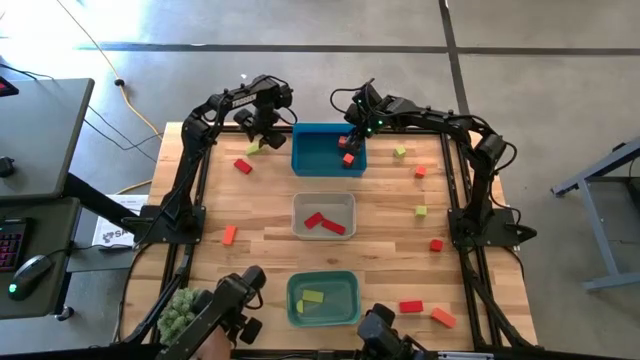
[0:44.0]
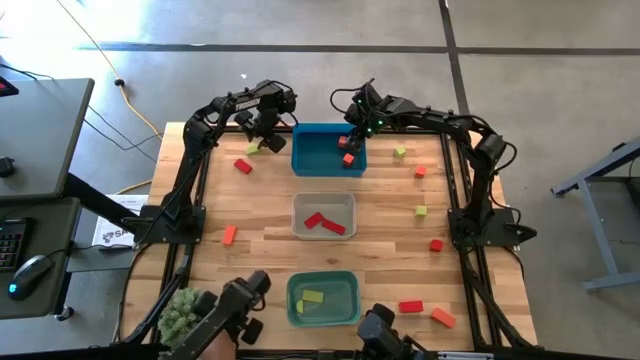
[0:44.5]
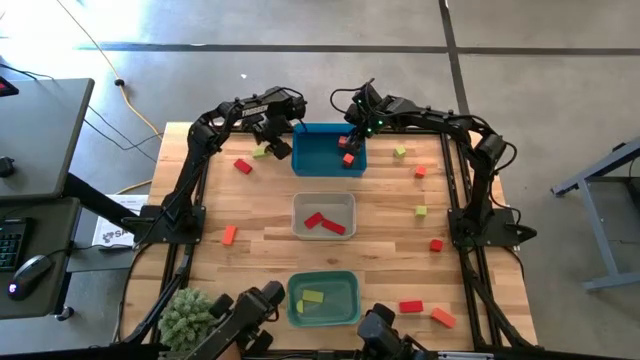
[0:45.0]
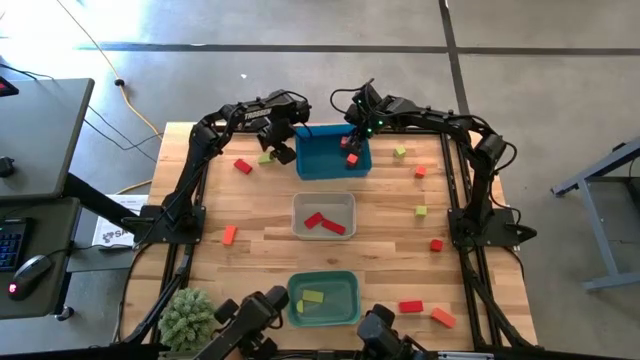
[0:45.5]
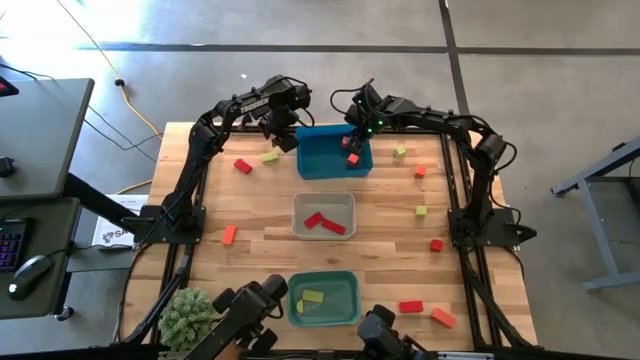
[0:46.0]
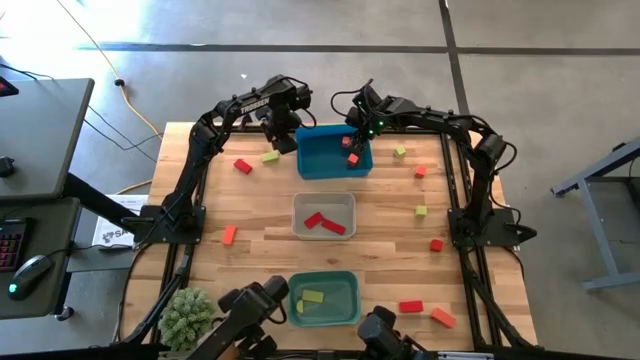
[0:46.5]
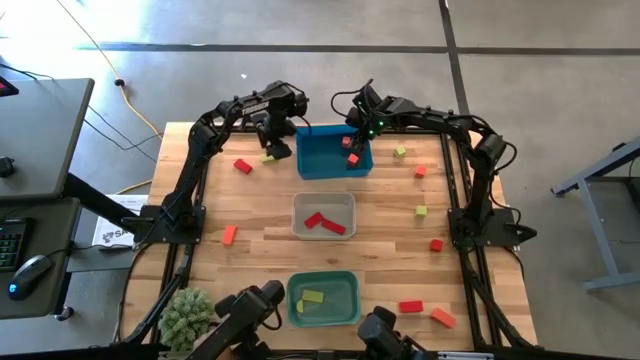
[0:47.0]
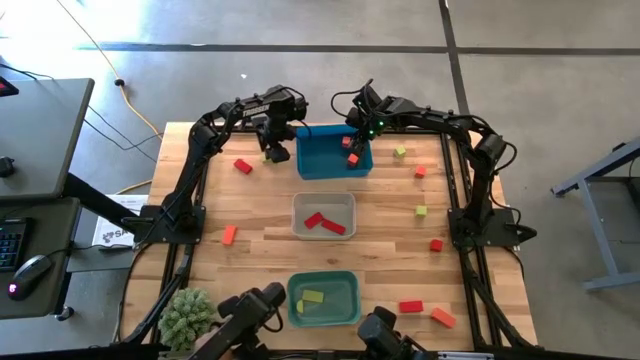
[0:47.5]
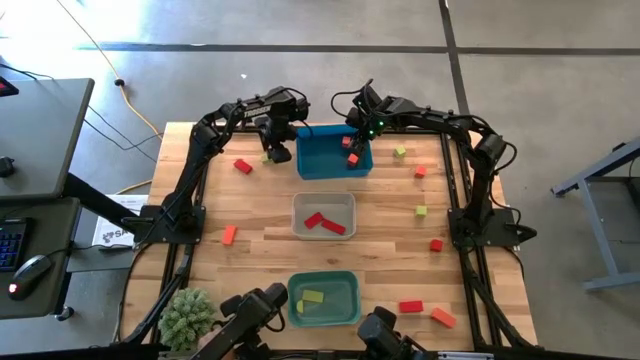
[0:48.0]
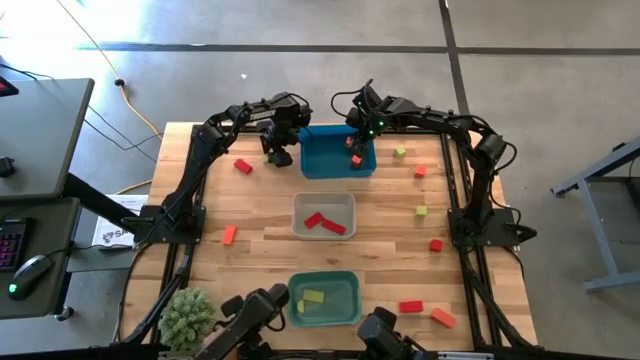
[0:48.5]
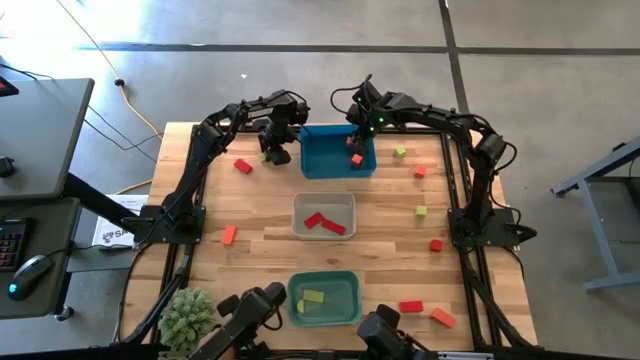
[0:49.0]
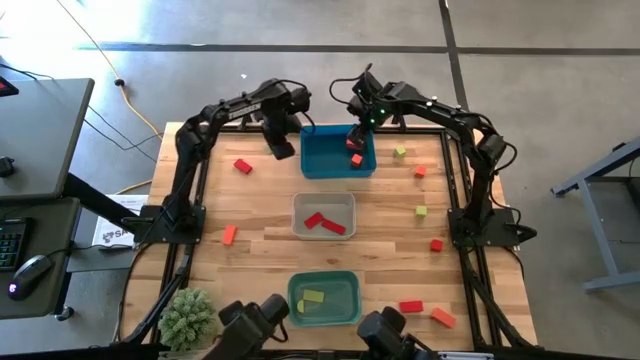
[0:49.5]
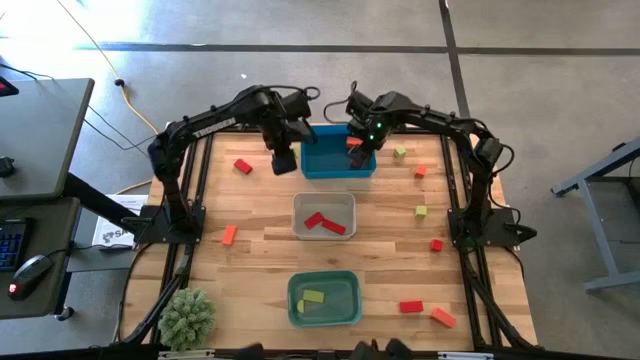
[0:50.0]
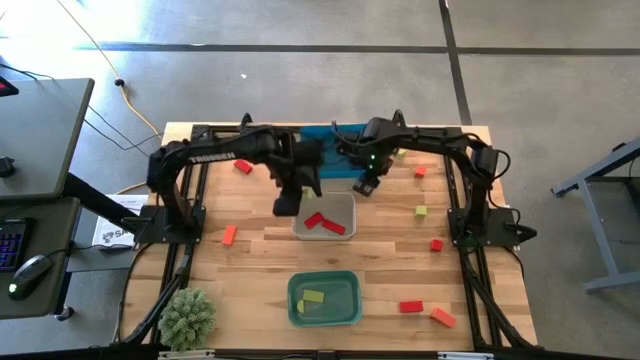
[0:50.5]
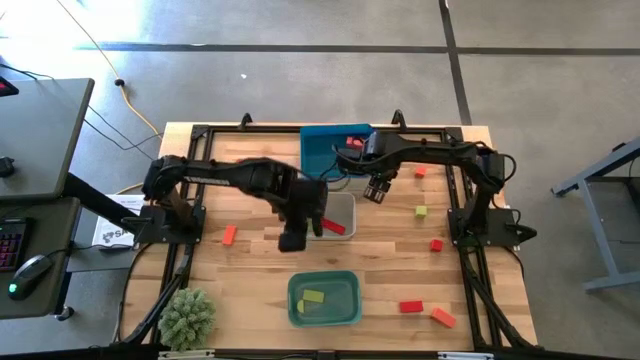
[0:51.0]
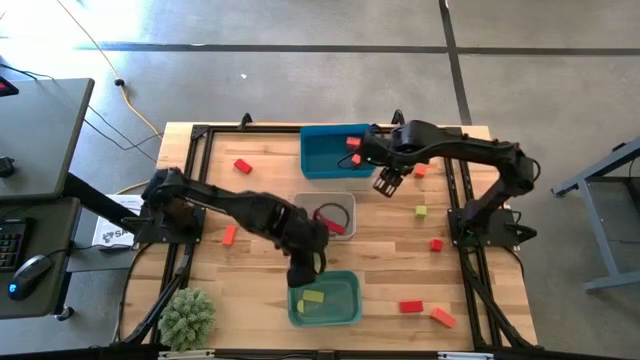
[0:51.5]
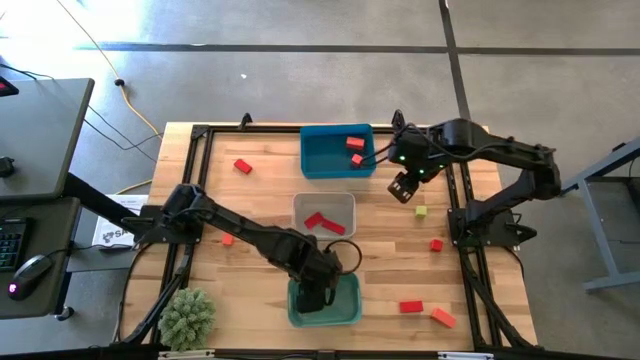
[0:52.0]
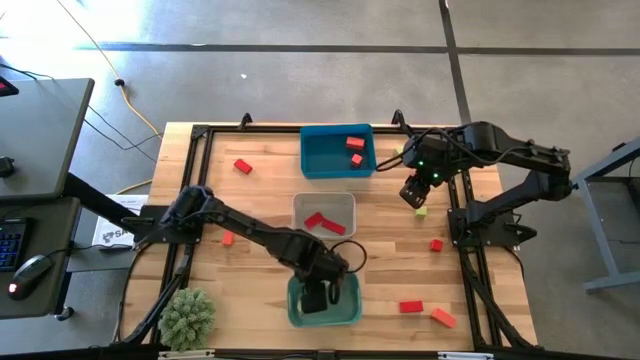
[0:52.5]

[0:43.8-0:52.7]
Task: Sort & place blocks by color
Put the light green block into the green bin

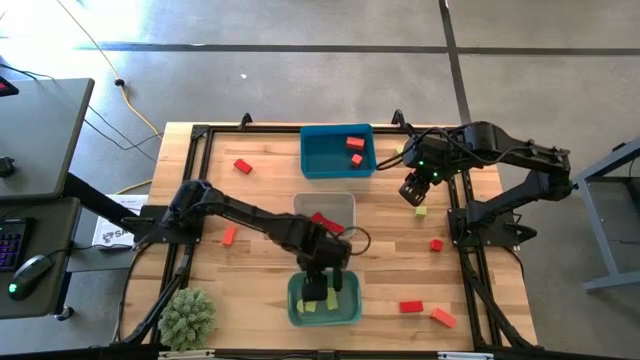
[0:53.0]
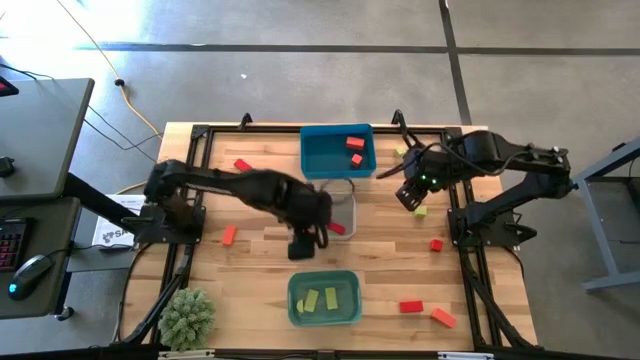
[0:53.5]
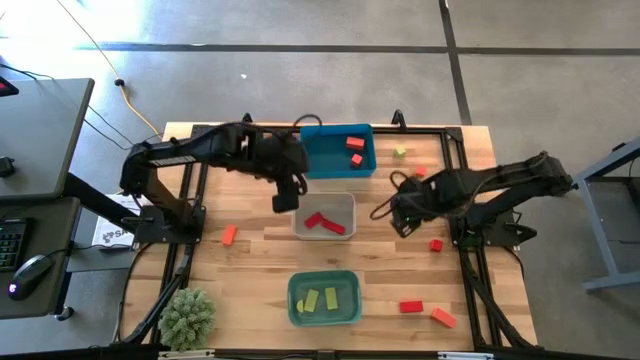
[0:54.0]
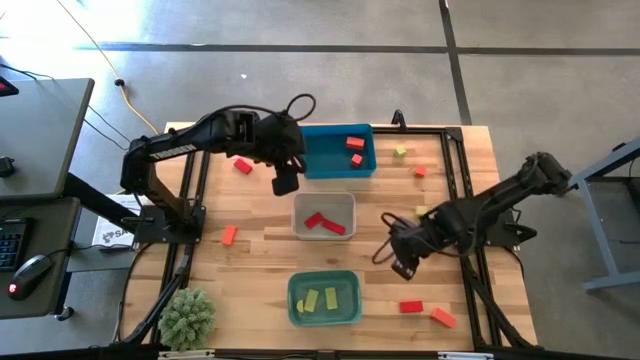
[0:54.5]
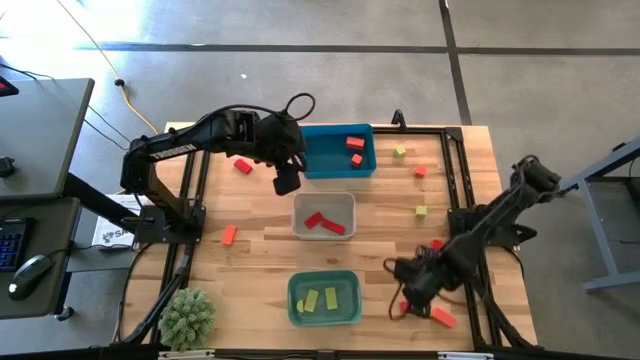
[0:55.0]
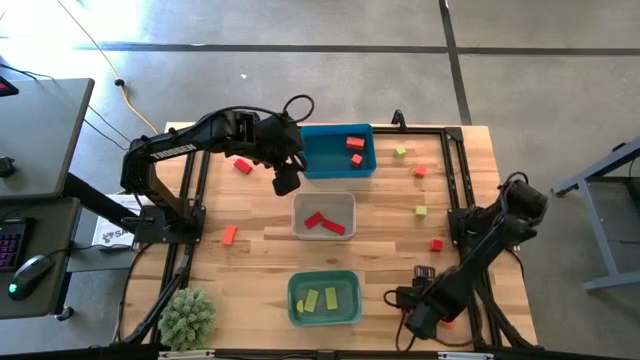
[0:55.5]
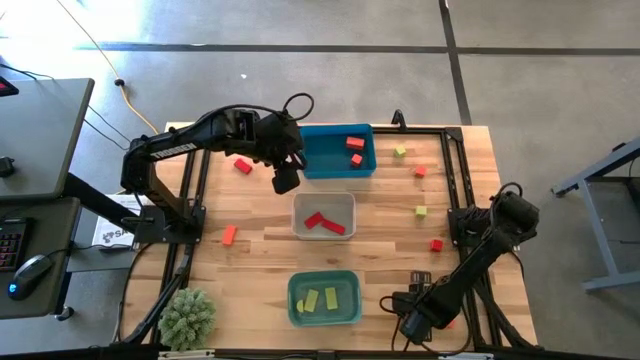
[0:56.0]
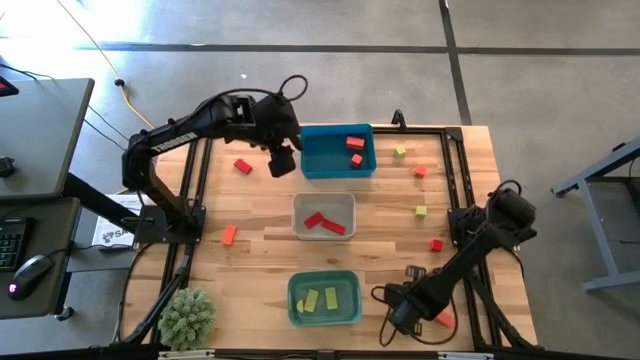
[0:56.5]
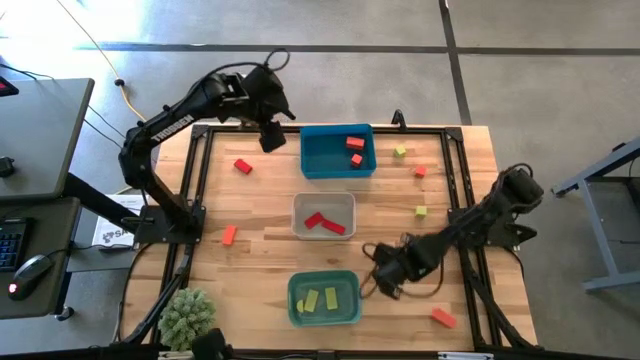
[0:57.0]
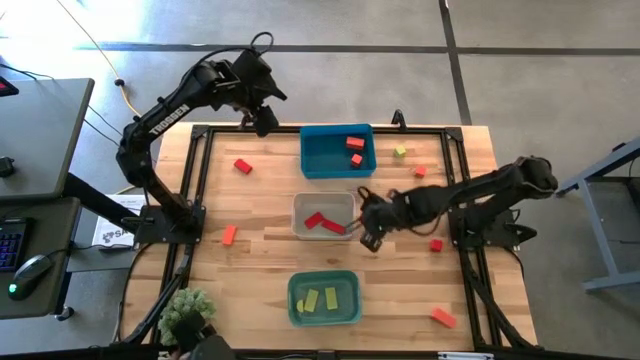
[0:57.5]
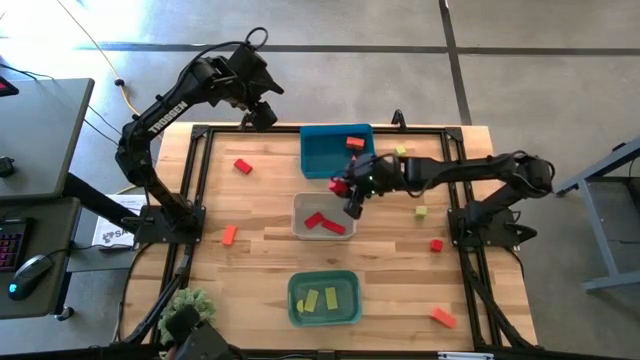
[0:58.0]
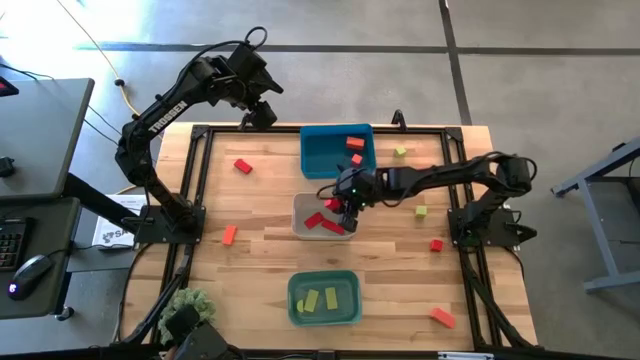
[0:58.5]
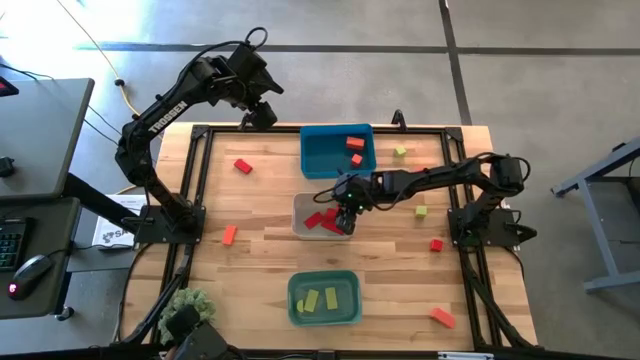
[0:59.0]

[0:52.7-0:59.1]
Put the red block into the gray bin

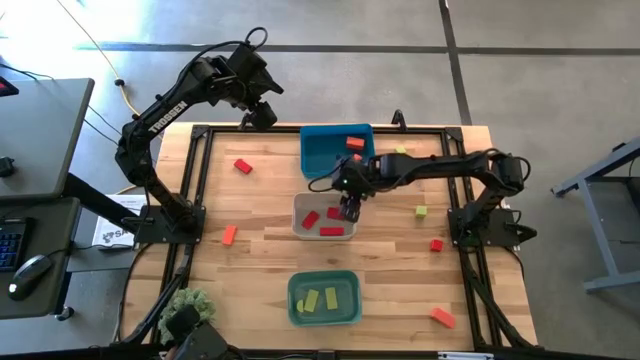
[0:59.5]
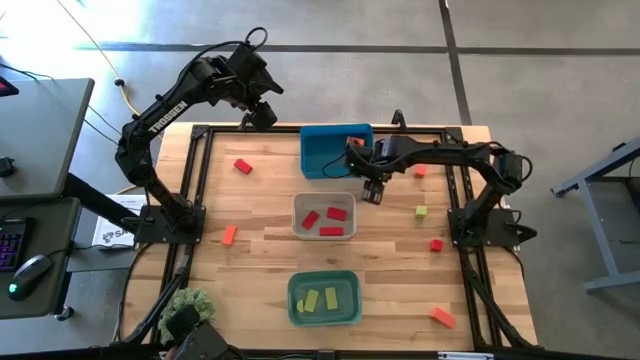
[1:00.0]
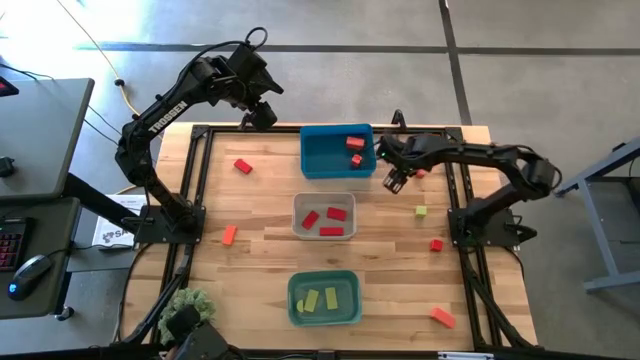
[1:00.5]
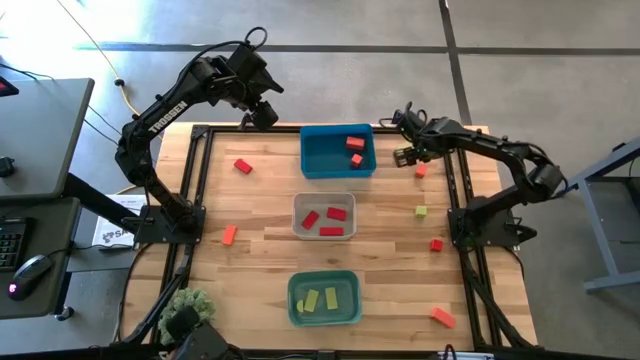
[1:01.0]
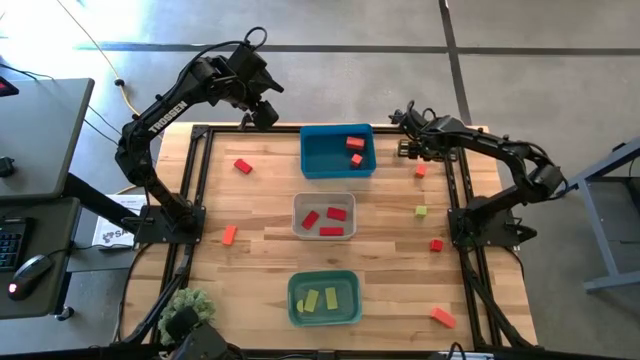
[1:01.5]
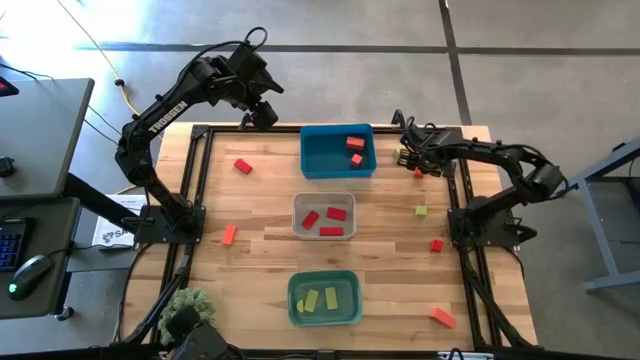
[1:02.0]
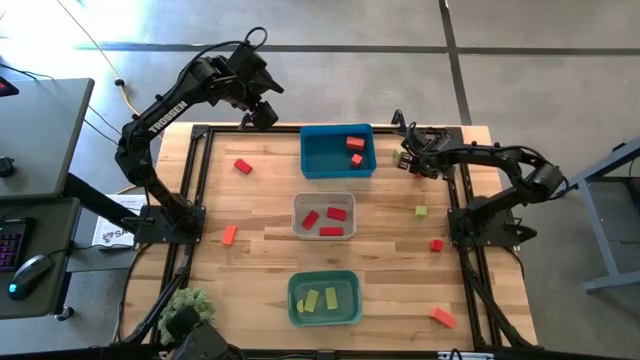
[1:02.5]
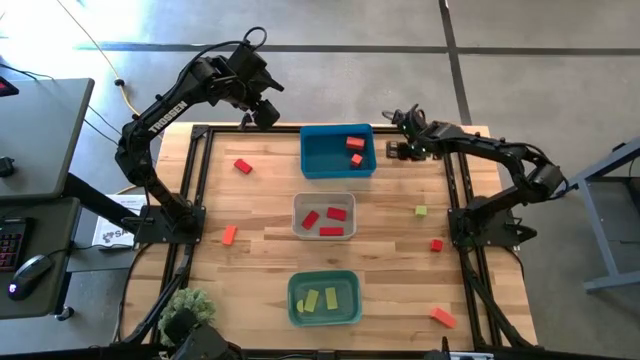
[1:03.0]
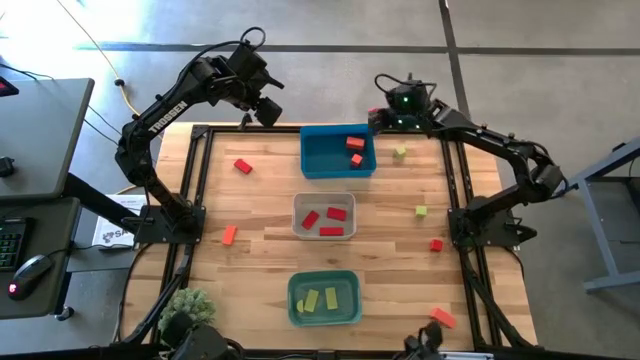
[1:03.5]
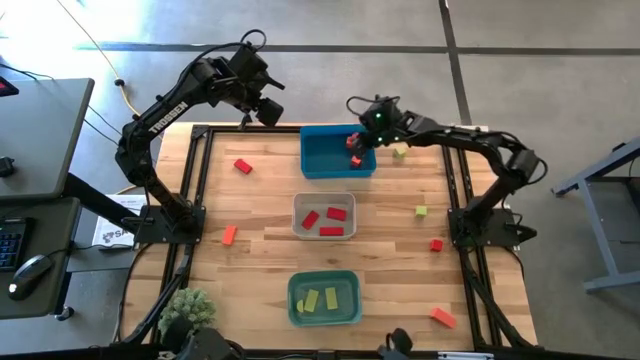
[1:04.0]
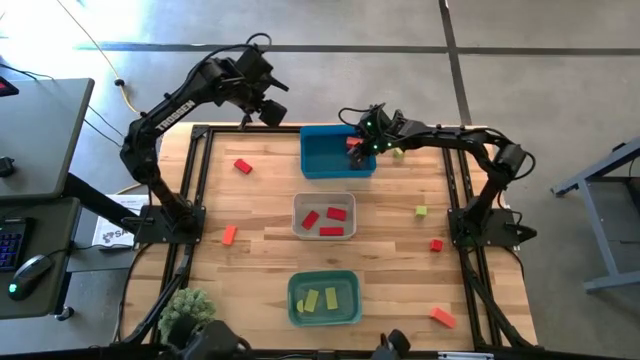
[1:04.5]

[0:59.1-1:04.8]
Put the orange block into the blue bin

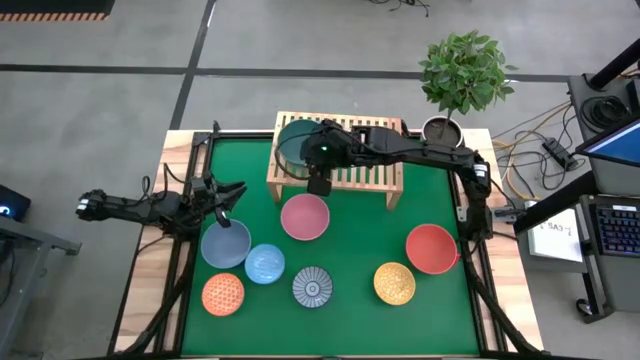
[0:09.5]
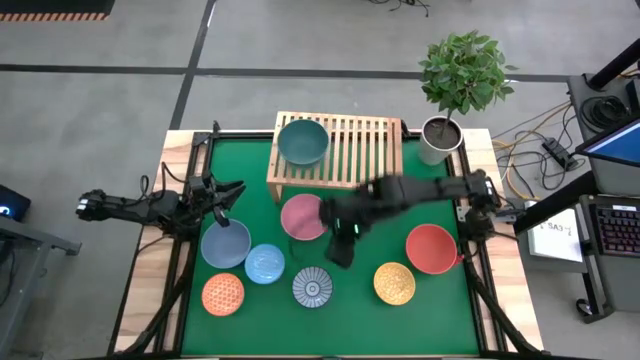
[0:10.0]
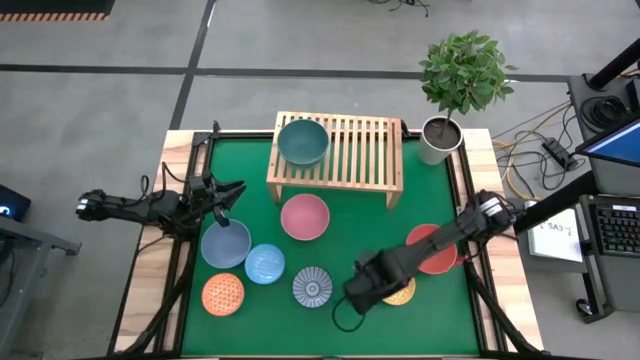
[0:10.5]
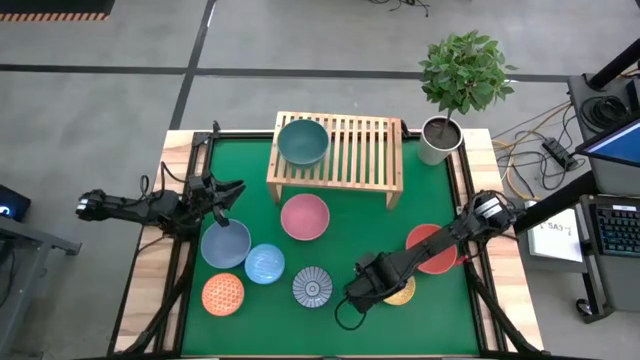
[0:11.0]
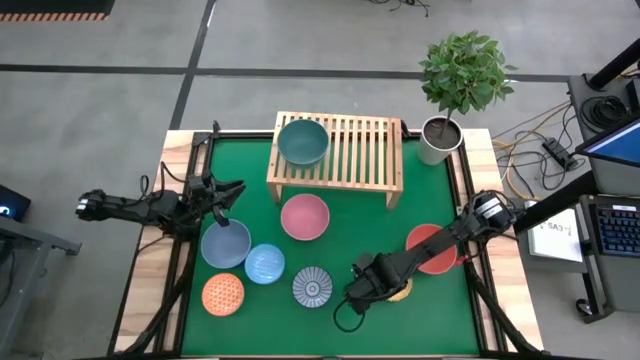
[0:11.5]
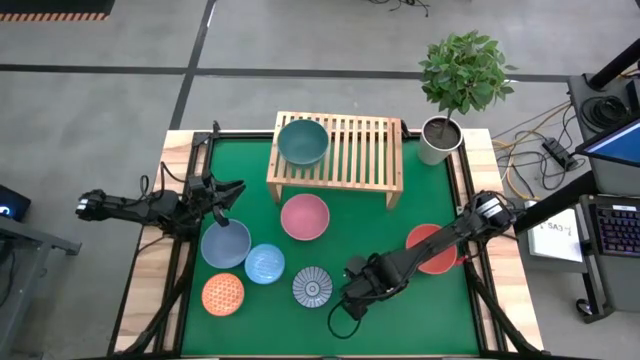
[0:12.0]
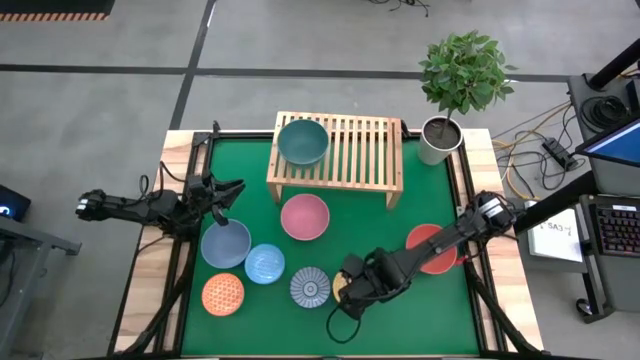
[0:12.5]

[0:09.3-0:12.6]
Task: Place and stack bowls onto a shelf
Put the yellow patterned bowl on the shelf
